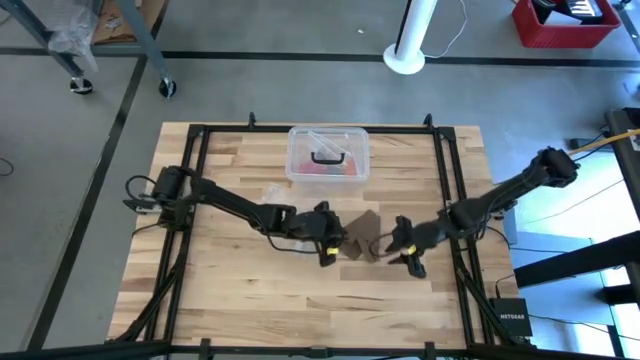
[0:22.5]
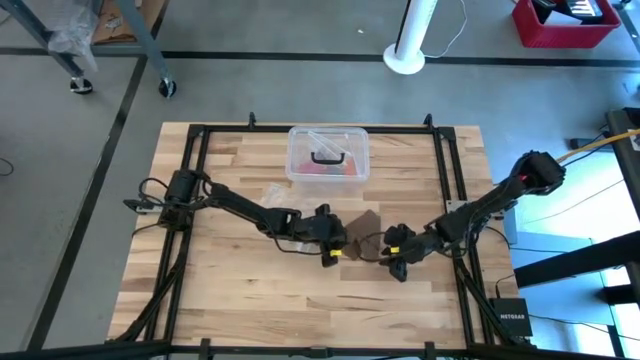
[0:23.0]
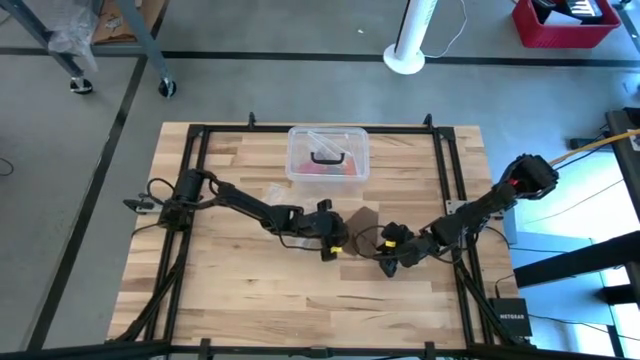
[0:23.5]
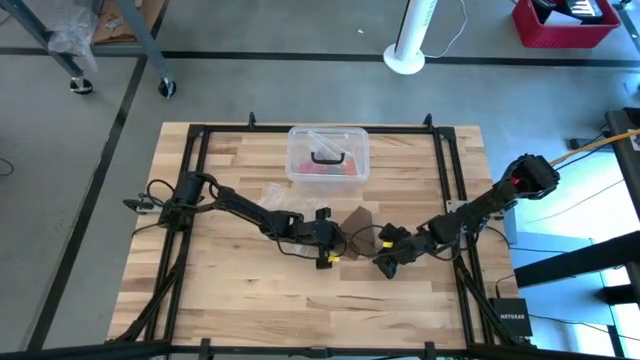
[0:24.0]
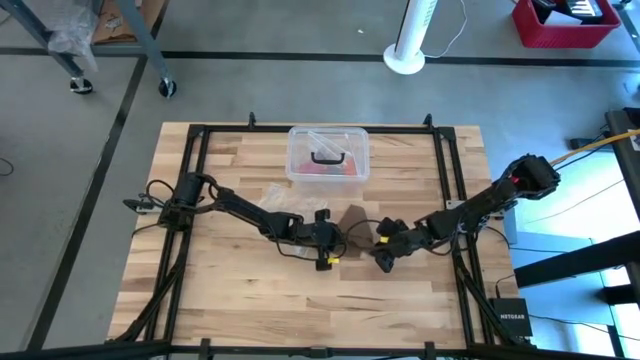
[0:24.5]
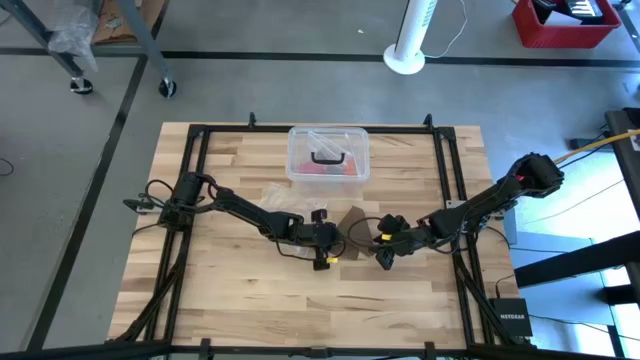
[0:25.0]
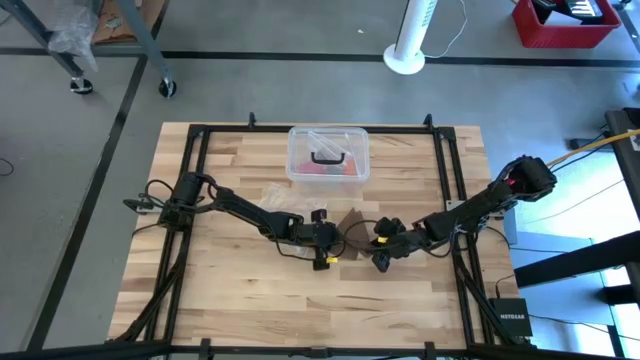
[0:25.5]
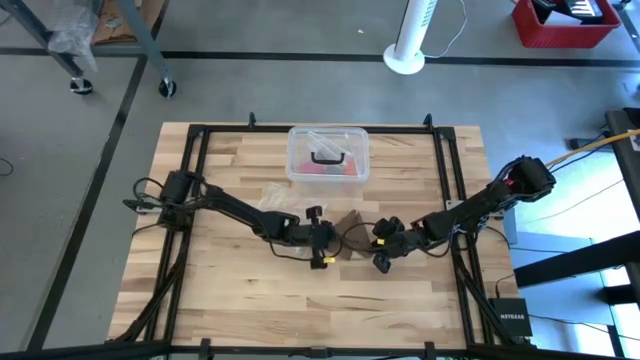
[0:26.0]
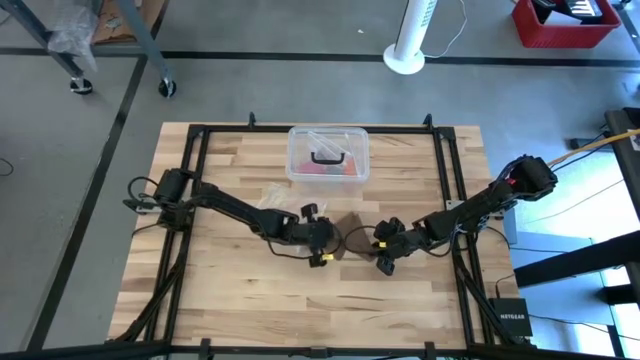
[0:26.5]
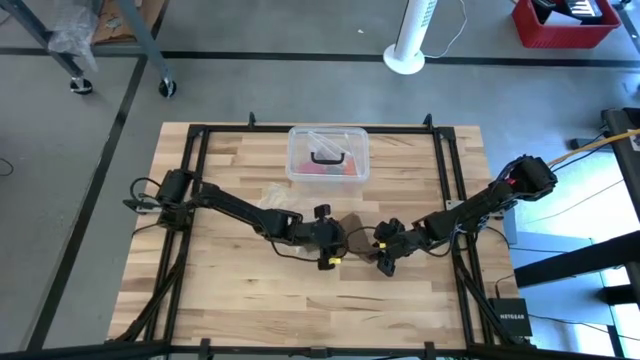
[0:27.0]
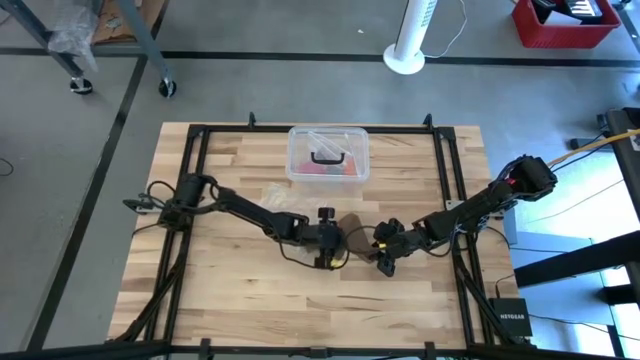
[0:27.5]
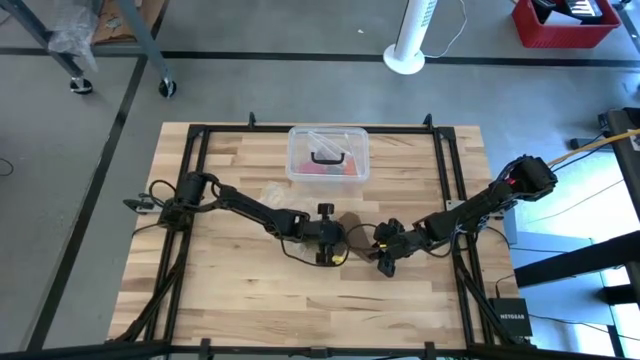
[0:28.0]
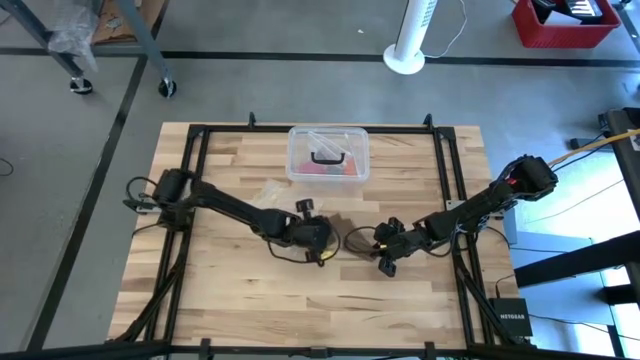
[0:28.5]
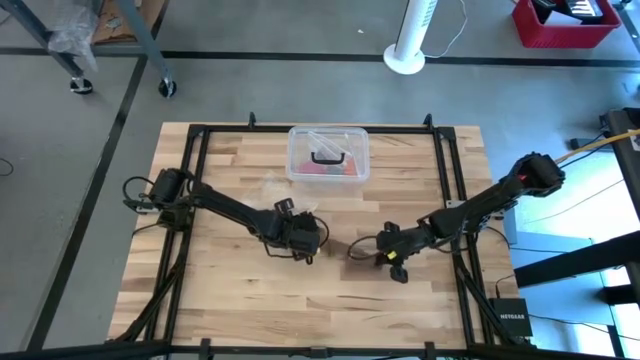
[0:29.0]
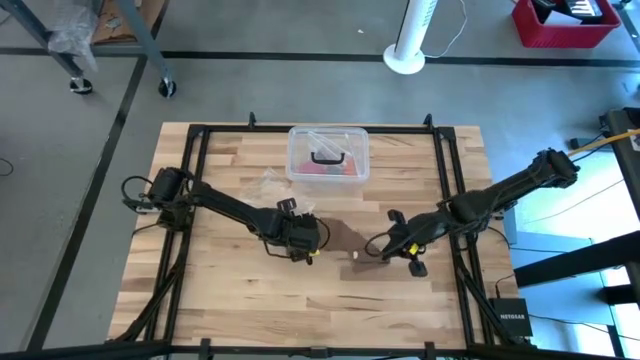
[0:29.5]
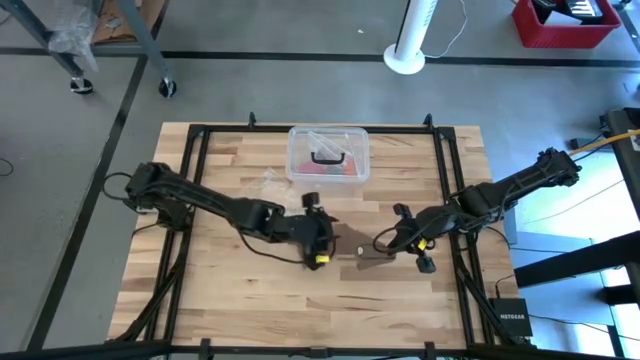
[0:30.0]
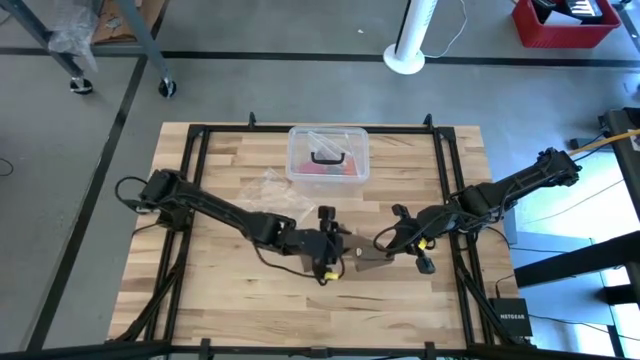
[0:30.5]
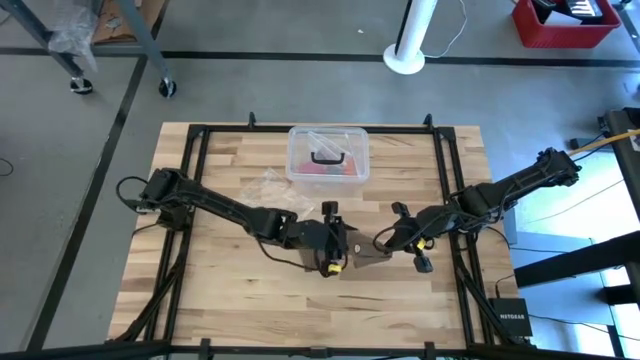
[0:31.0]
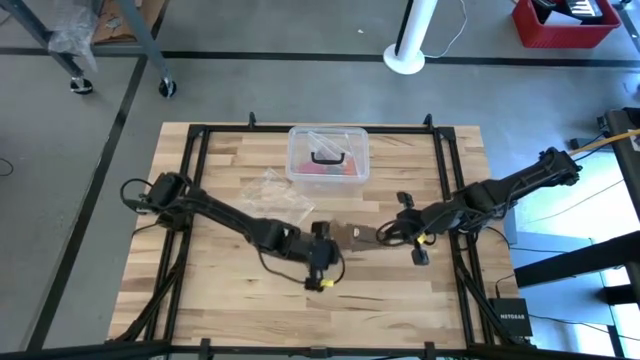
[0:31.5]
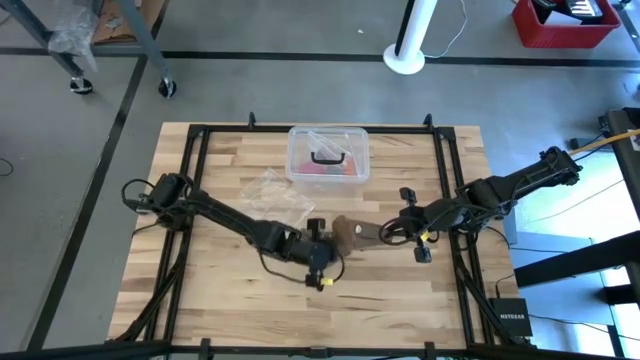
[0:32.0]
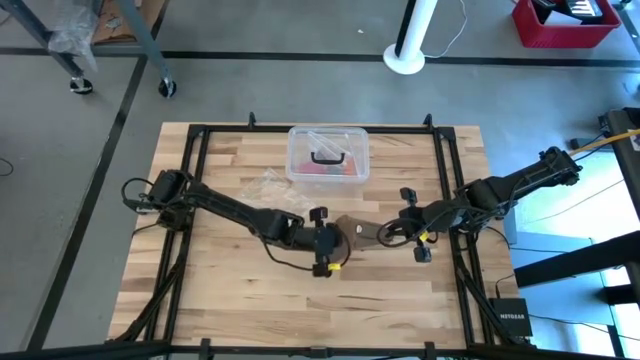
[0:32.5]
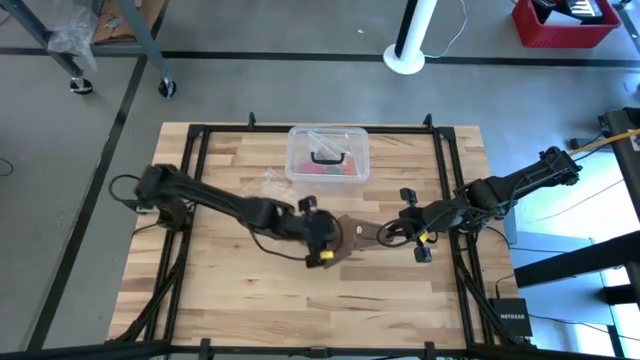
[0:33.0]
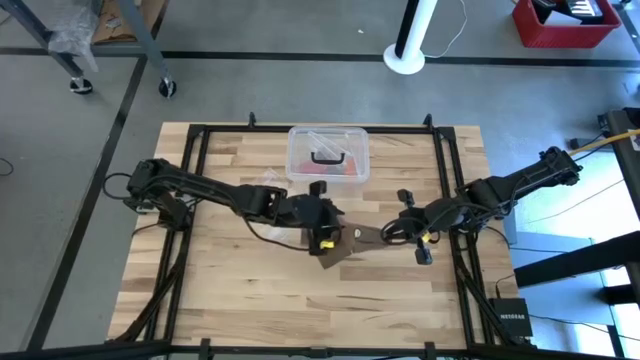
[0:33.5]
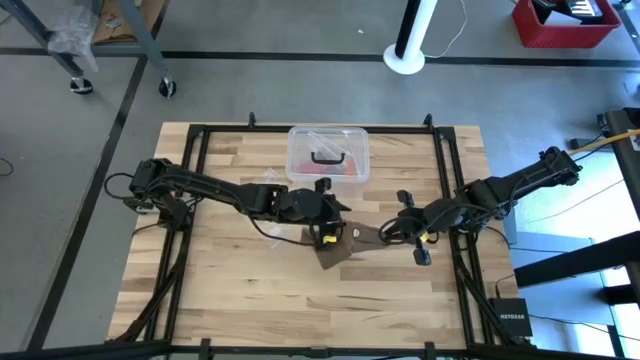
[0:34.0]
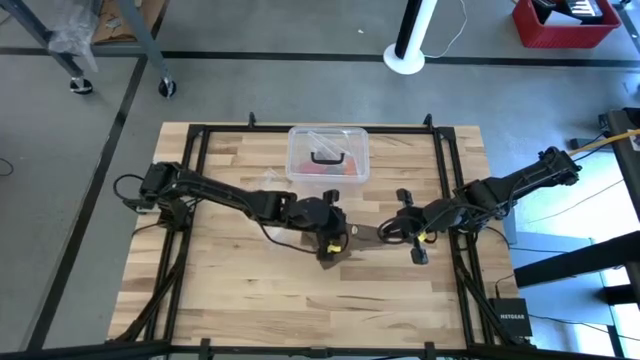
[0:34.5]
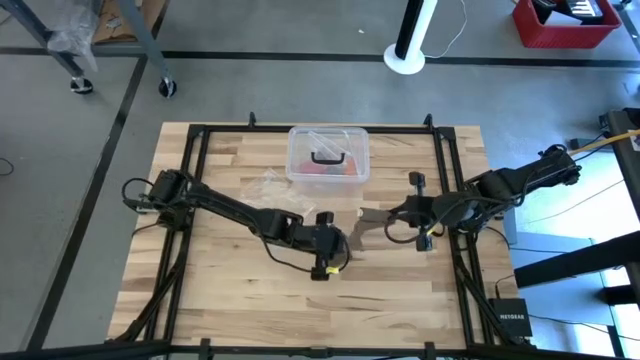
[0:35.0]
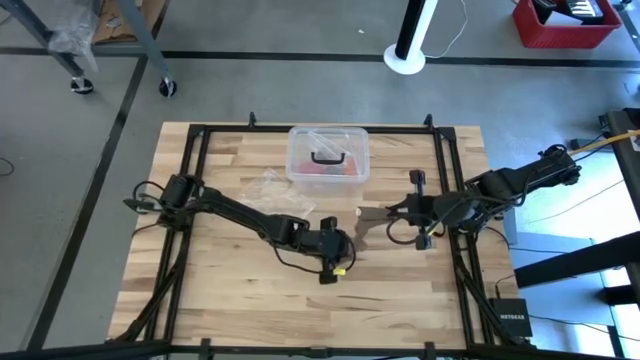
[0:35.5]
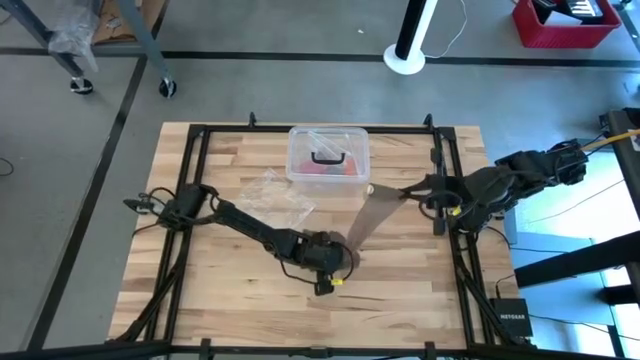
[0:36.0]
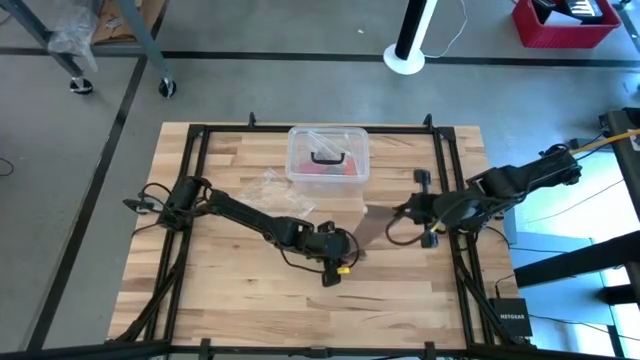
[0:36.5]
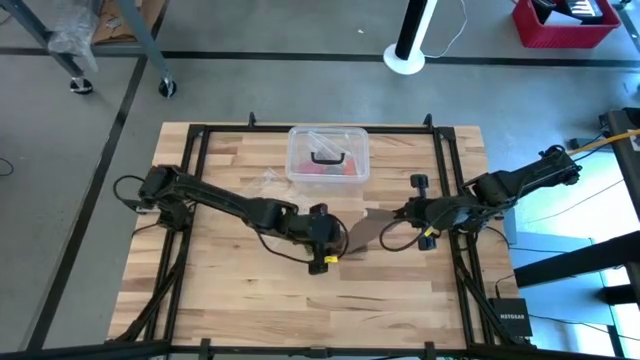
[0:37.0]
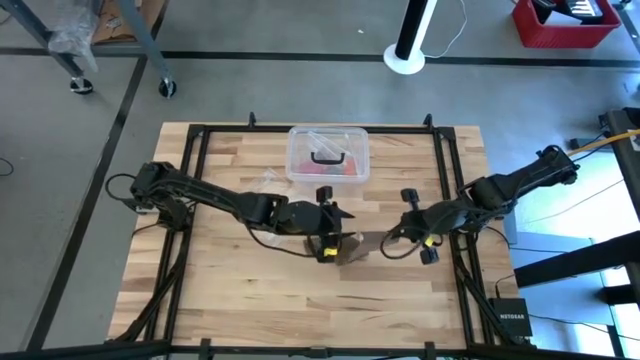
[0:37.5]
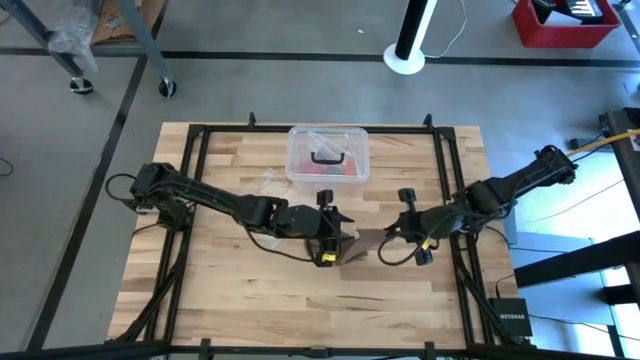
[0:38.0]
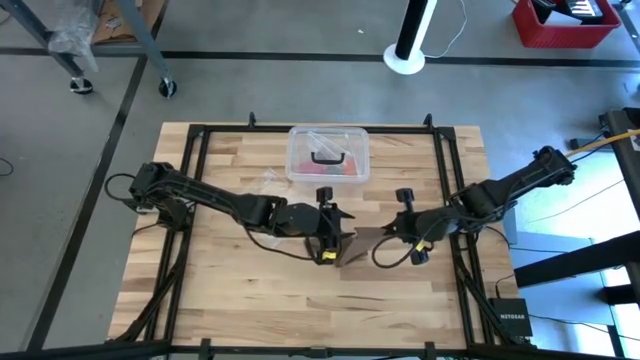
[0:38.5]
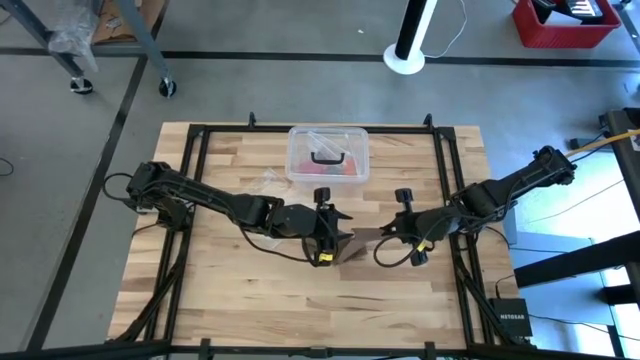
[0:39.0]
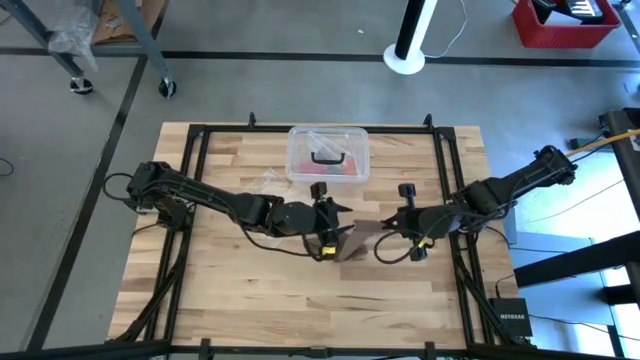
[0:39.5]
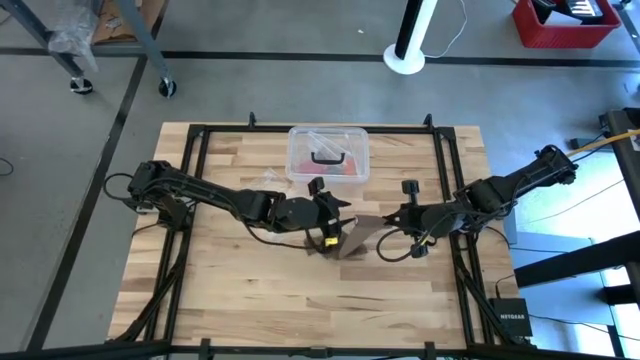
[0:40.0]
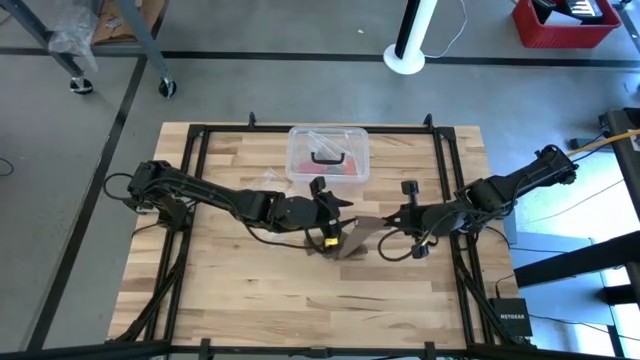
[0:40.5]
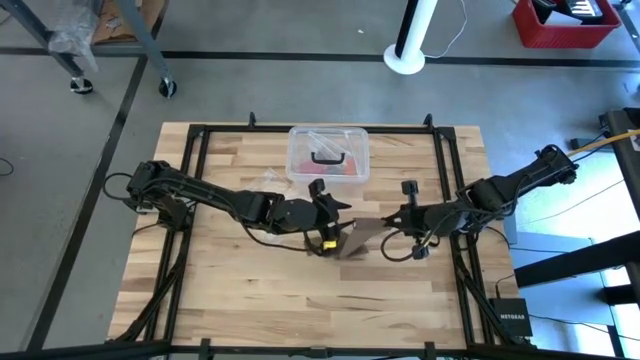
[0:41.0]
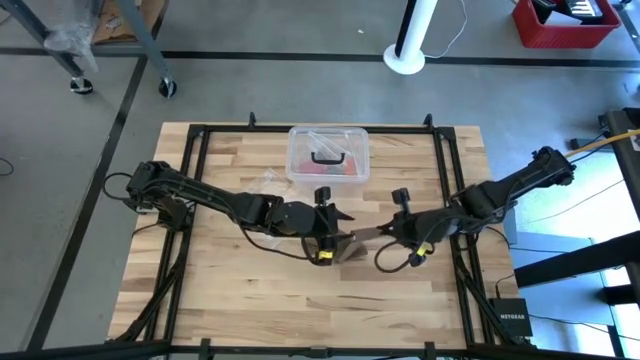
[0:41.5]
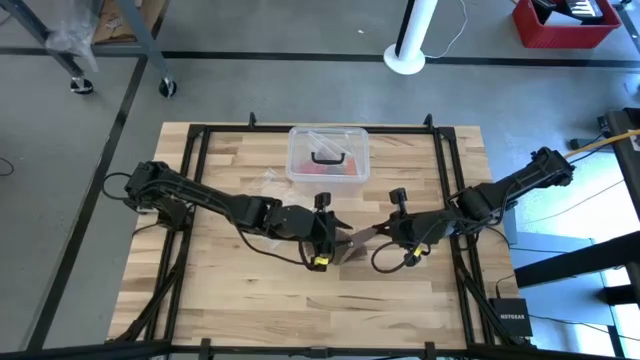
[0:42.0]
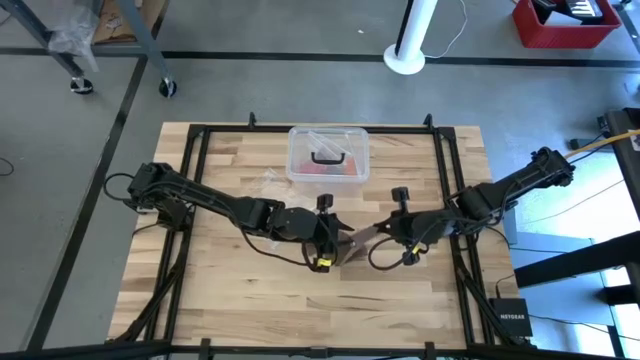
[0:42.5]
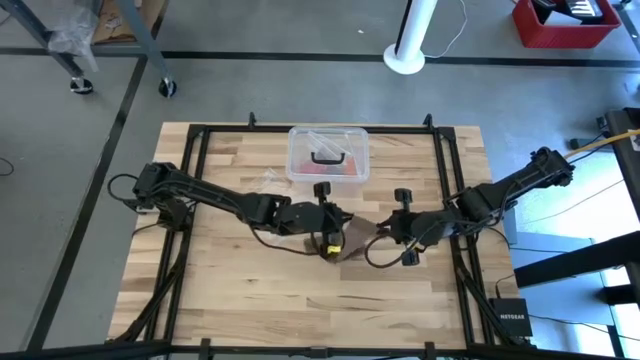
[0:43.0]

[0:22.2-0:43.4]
Task: Roll bandage
Roll the brown bandage
